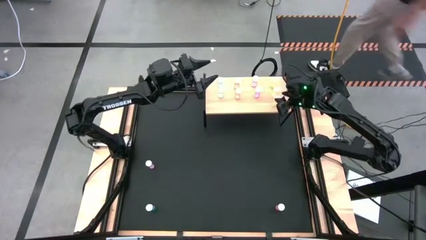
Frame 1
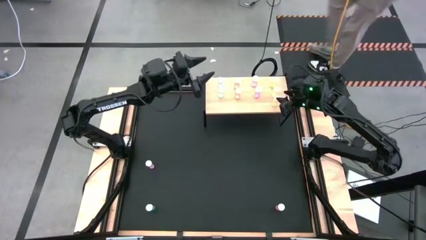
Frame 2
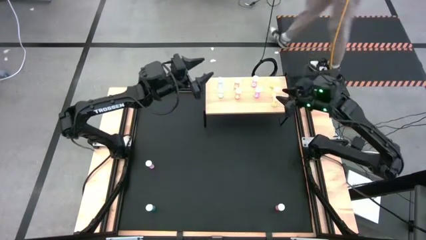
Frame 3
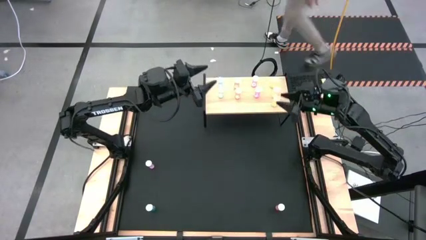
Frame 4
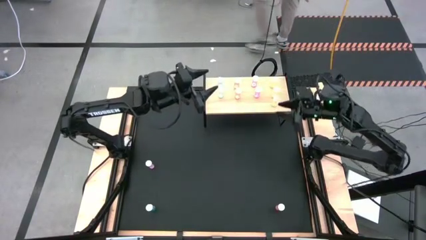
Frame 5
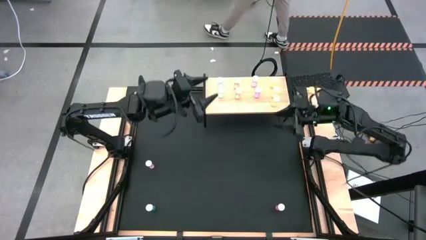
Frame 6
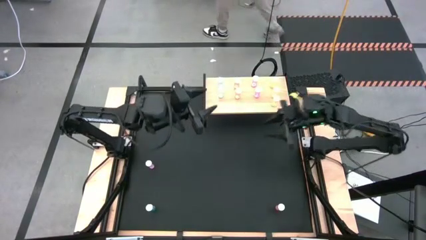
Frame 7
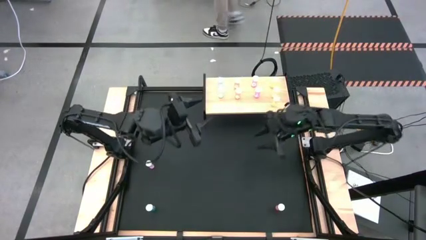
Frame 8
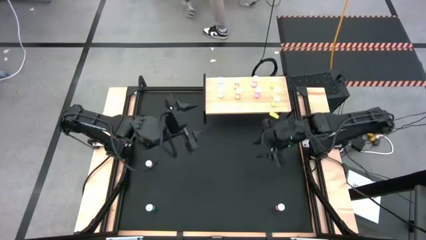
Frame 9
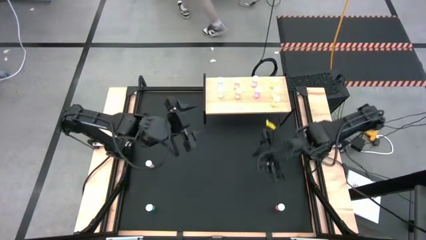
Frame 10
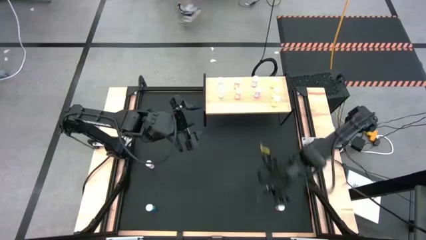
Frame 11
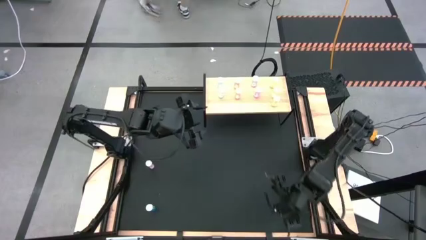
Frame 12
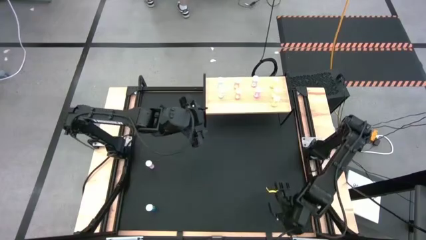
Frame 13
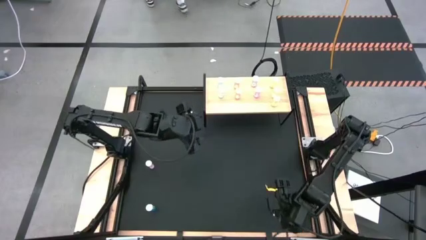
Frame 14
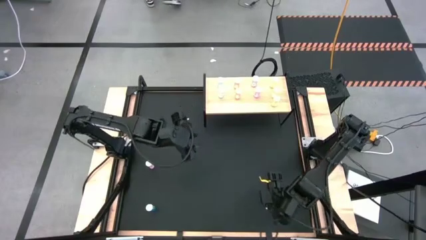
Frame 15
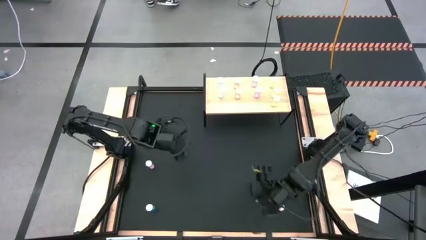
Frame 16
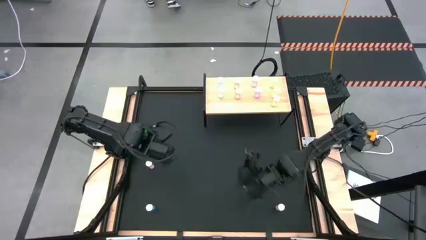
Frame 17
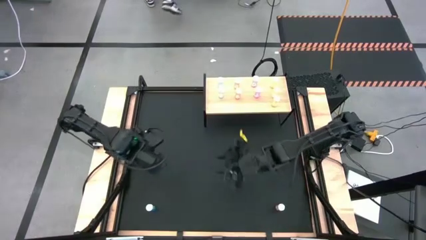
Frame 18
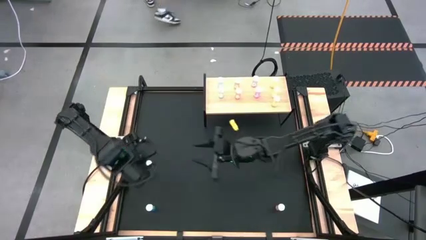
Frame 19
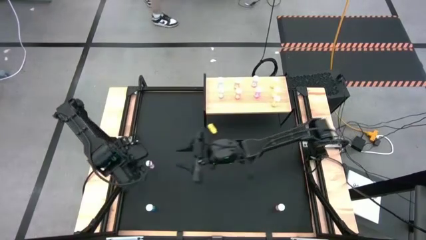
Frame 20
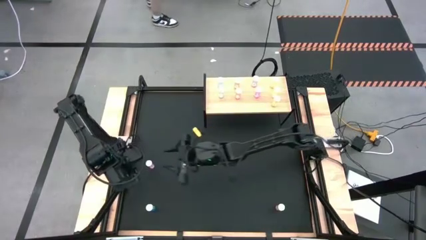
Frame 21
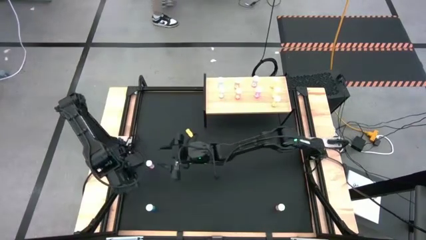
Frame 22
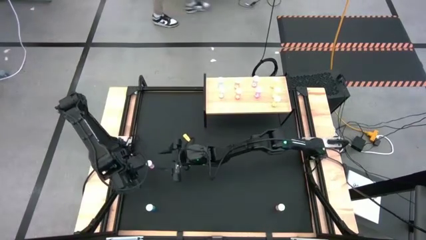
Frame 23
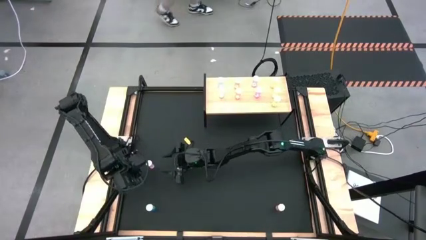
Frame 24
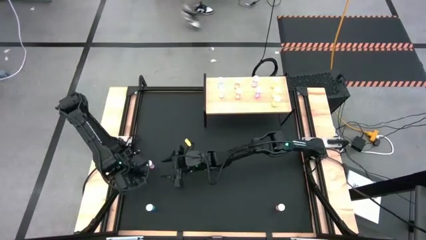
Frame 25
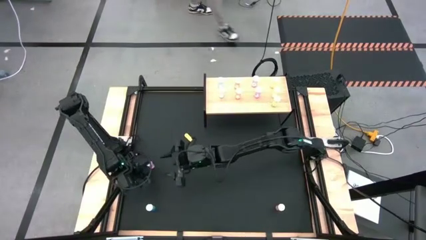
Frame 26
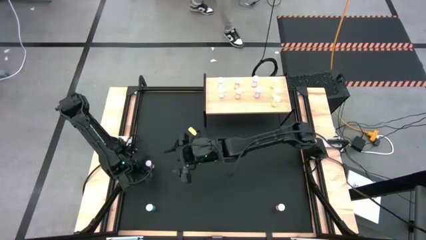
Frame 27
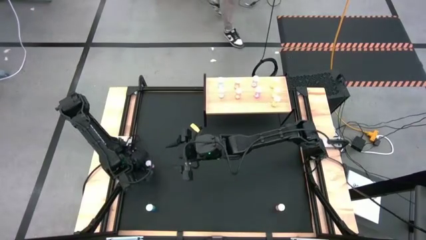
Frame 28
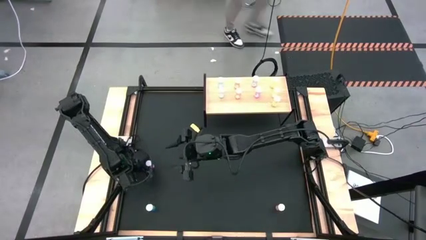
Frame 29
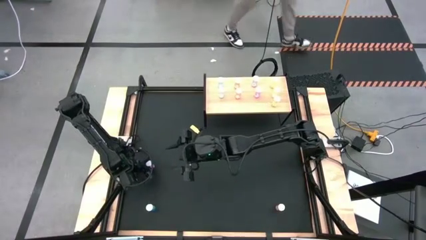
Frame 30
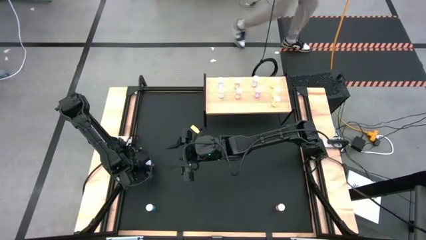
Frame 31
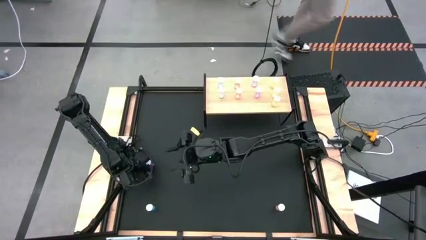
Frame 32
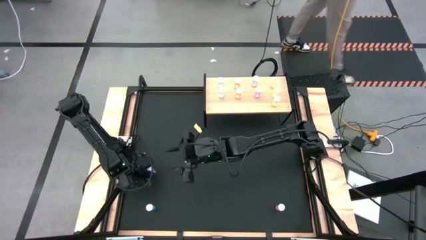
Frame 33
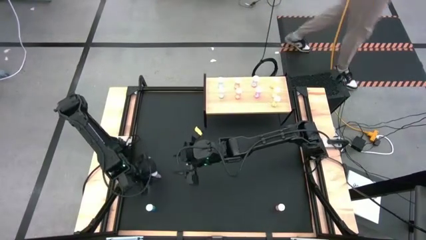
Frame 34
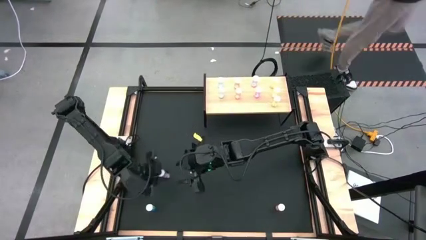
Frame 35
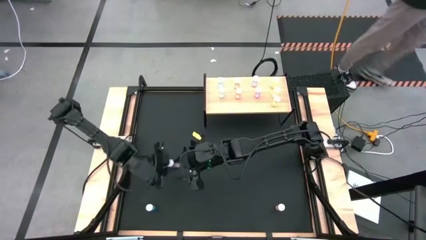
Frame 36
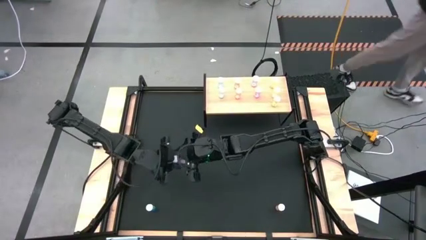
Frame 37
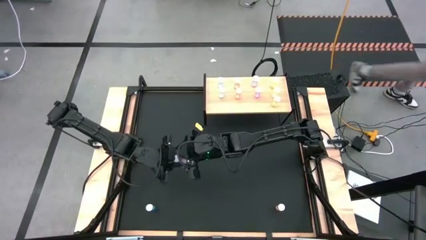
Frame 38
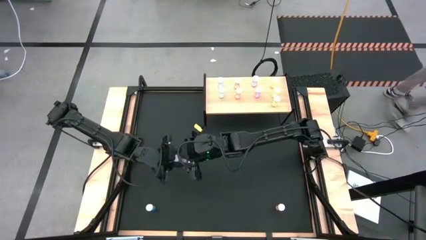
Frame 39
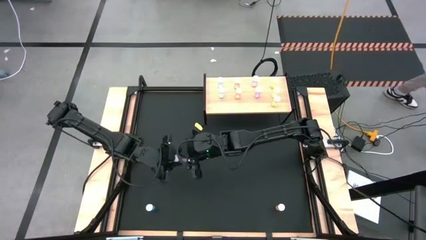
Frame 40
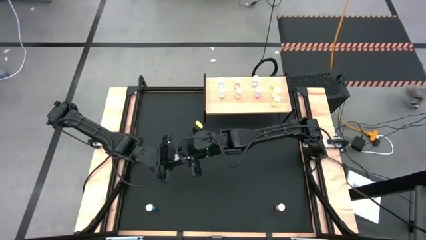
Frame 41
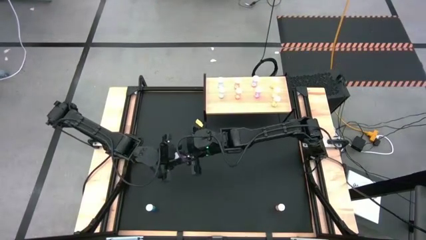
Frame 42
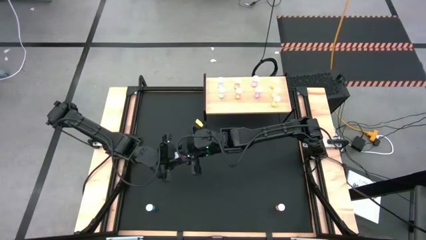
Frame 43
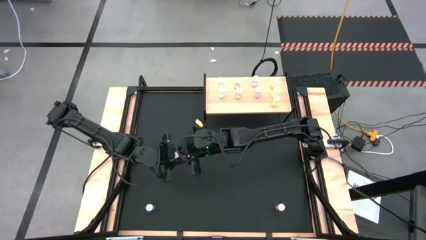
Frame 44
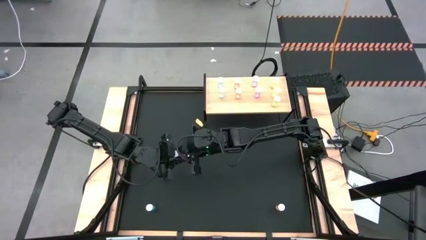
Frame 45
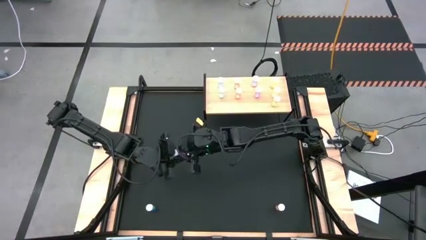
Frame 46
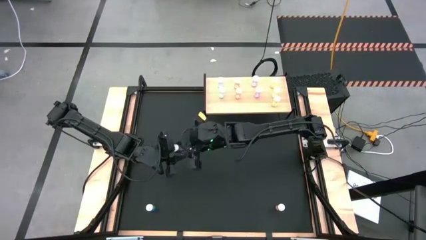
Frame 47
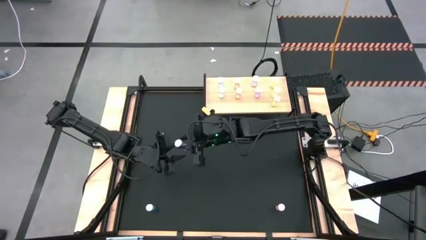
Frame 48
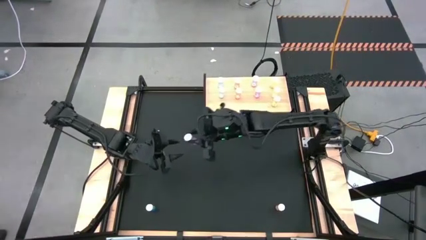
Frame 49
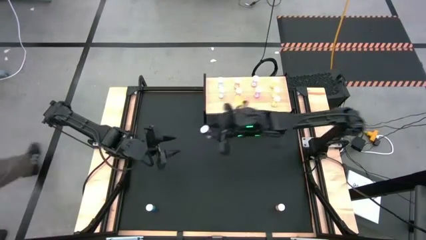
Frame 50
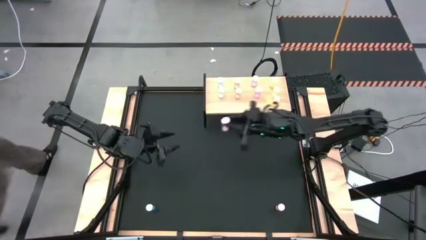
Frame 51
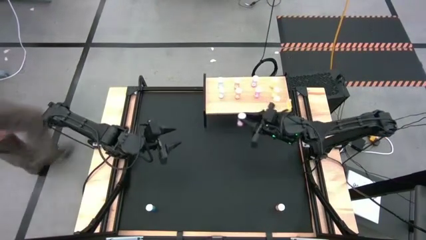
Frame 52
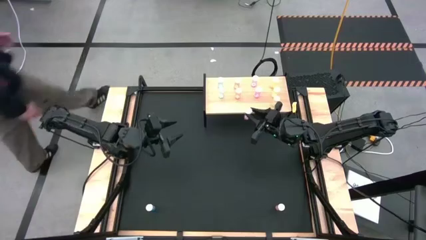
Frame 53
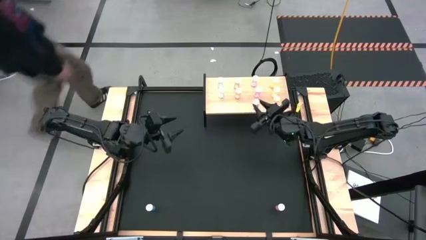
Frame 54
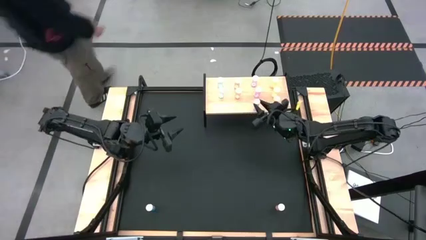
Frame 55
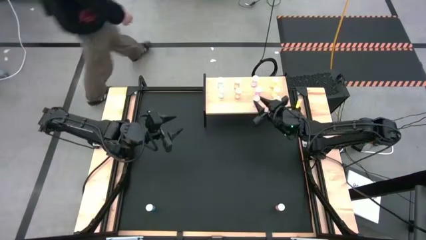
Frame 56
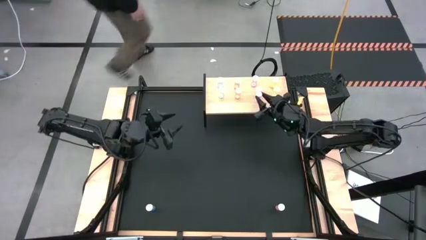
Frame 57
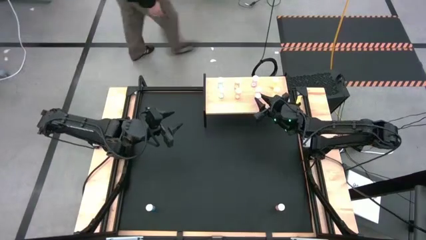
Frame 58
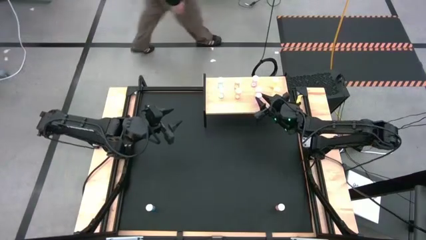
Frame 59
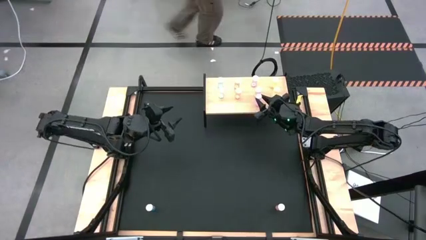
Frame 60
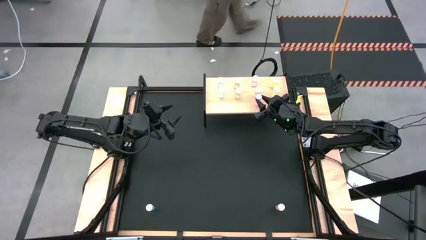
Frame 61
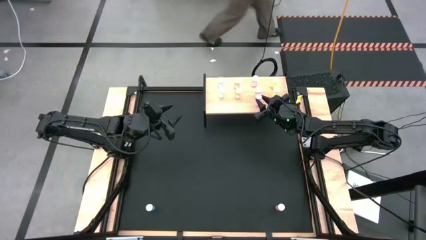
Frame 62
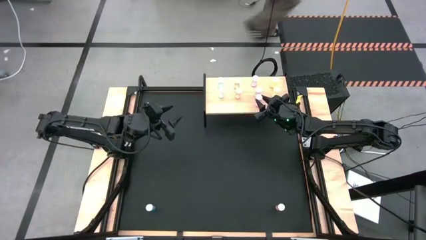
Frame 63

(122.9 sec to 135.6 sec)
Task: Pick and place medicine bottles onto shelf by color
Put the pink pill bottle on the shelf aligned with the other pink pill bottles

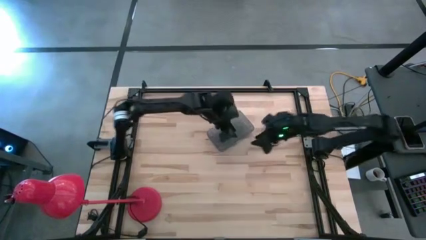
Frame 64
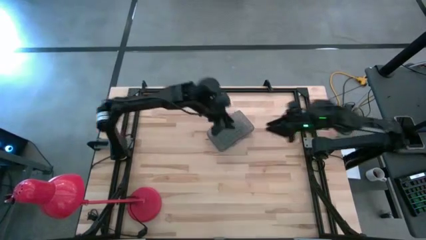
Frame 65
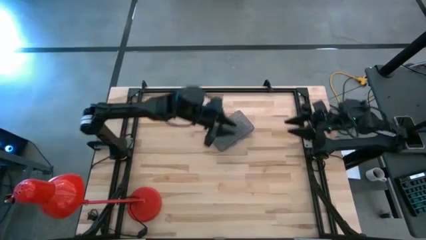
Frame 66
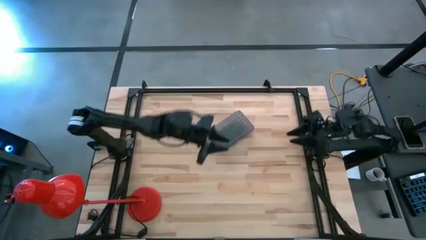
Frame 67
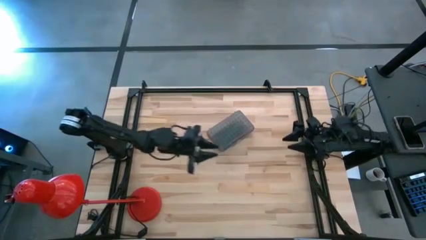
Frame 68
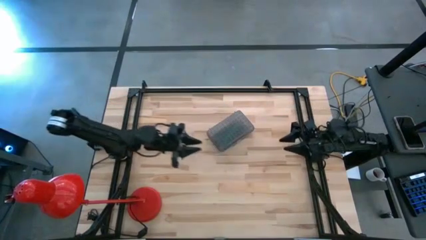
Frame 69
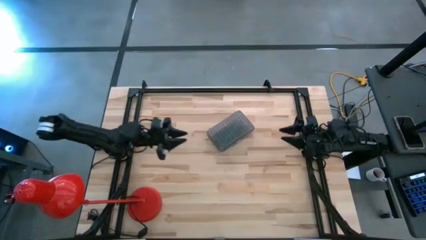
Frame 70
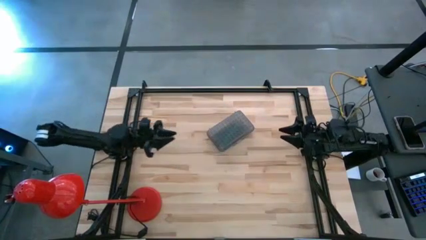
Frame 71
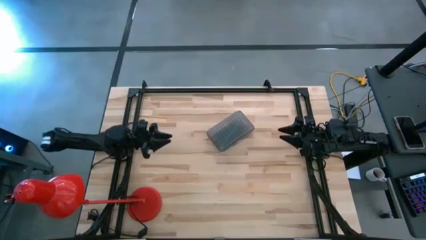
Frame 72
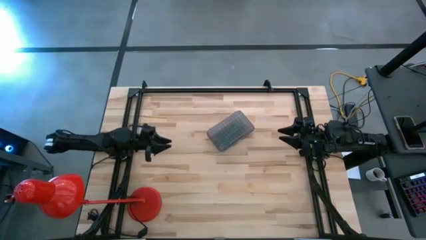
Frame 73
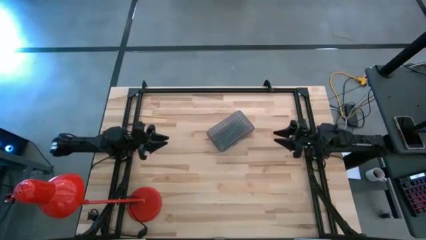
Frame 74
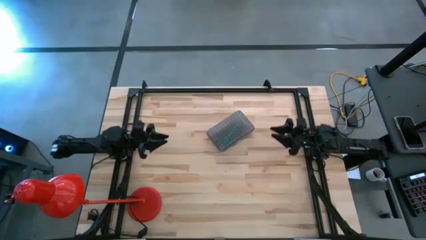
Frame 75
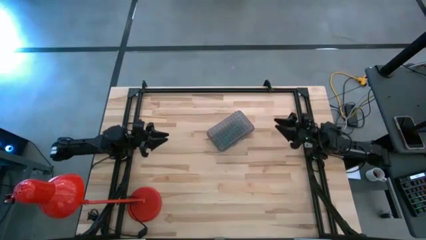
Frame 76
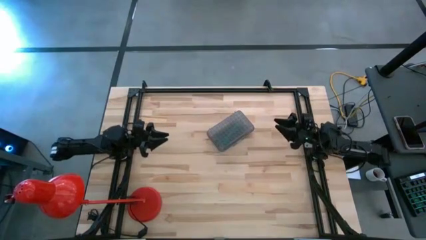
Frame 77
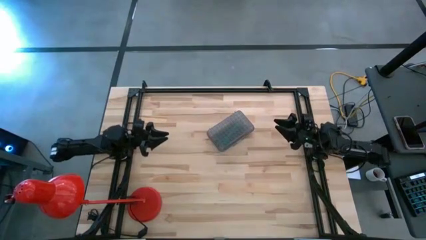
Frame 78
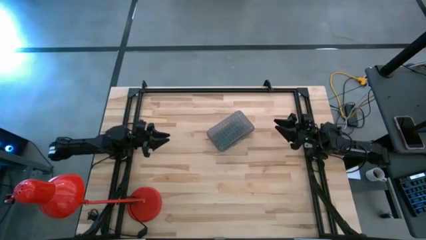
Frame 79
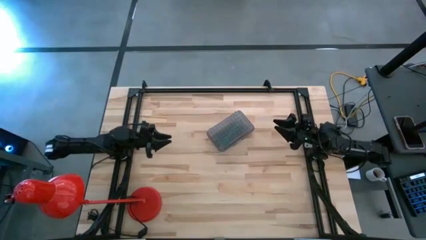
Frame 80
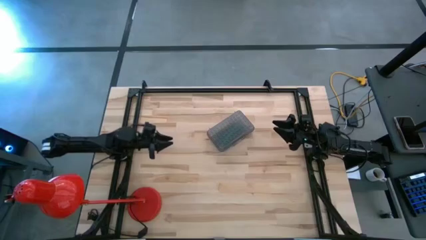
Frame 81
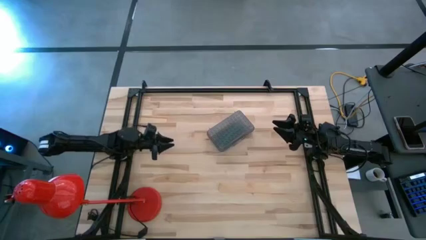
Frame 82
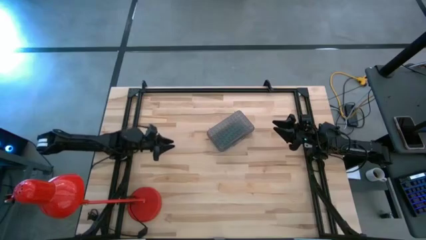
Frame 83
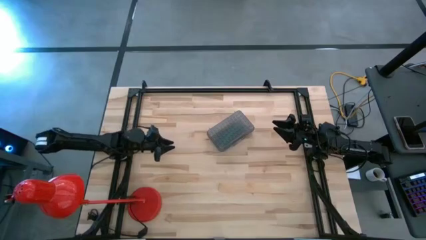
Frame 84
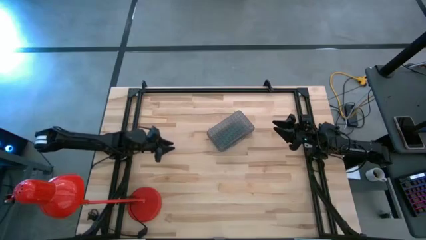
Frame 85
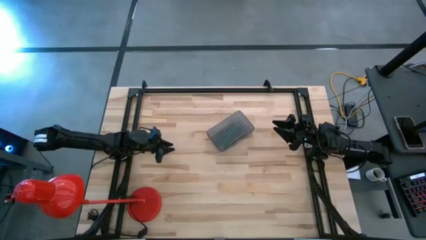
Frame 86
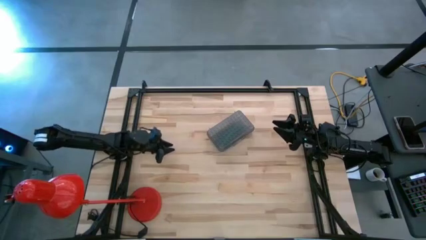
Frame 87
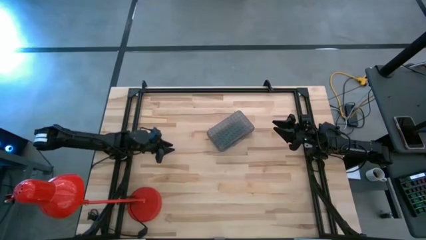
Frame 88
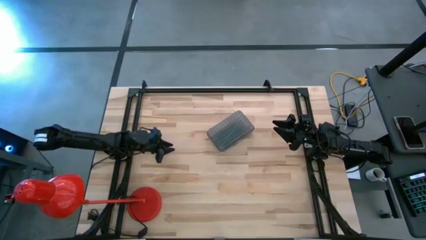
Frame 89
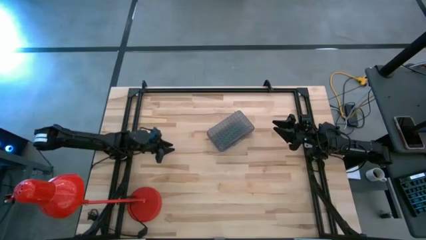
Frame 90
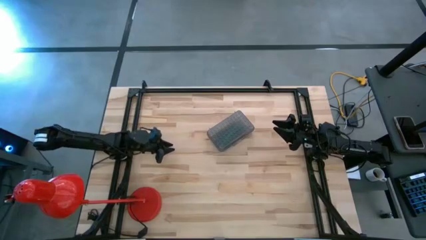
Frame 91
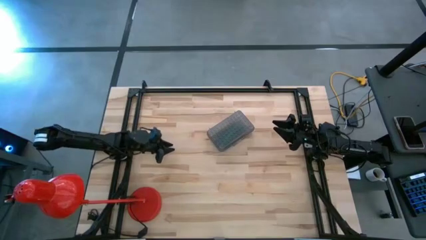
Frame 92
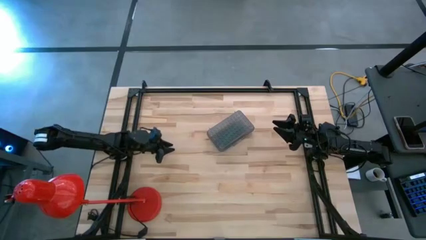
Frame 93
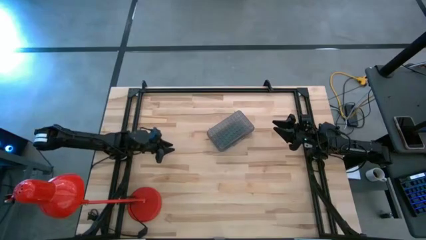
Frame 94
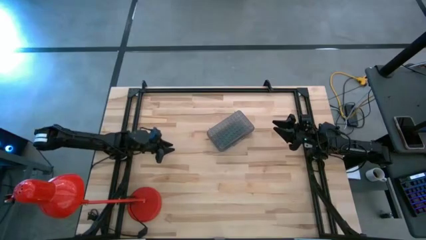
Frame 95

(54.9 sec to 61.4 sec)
Task: Pick & place school supplies into a supply box
Return to Home Position
